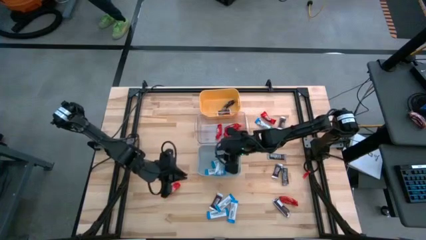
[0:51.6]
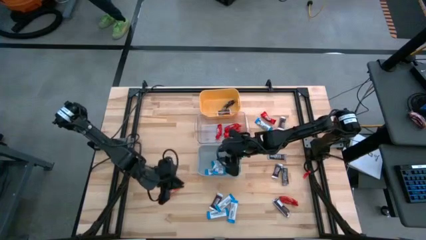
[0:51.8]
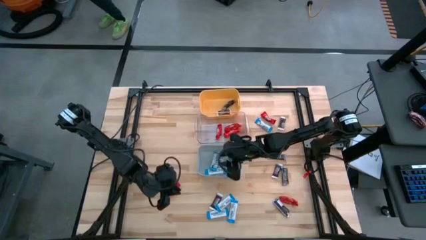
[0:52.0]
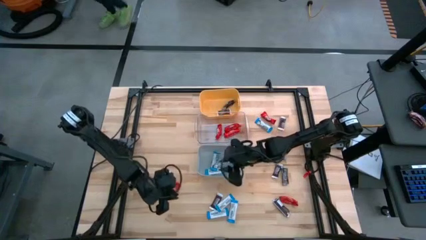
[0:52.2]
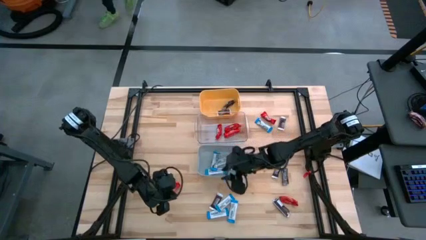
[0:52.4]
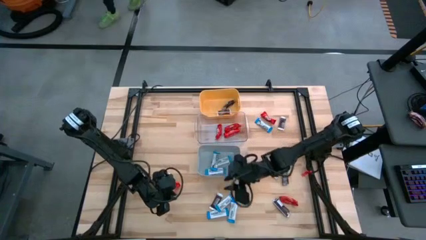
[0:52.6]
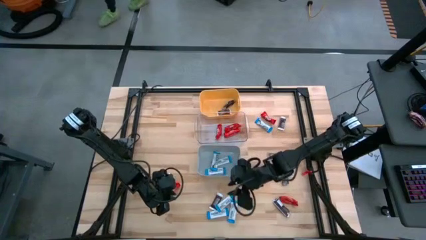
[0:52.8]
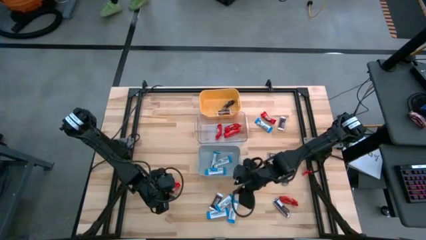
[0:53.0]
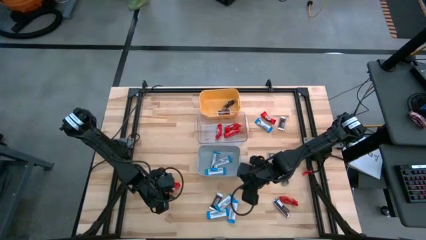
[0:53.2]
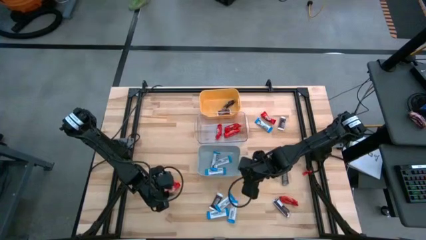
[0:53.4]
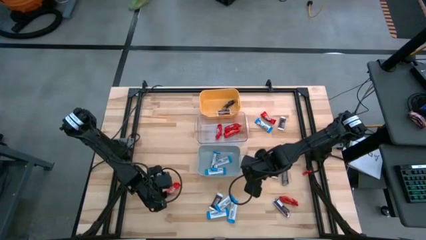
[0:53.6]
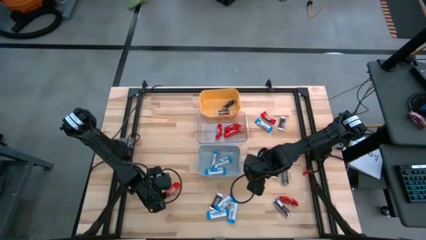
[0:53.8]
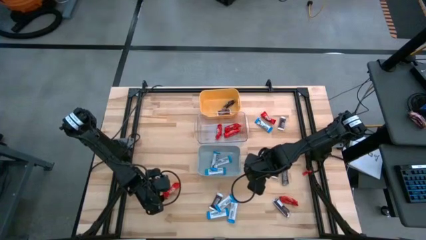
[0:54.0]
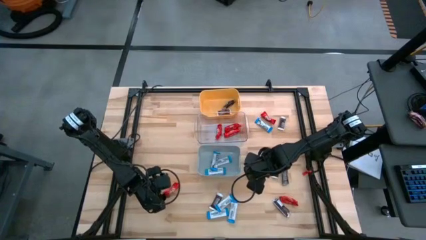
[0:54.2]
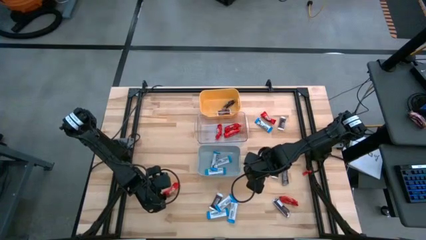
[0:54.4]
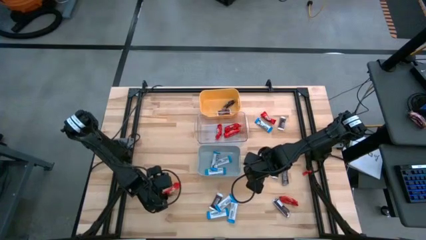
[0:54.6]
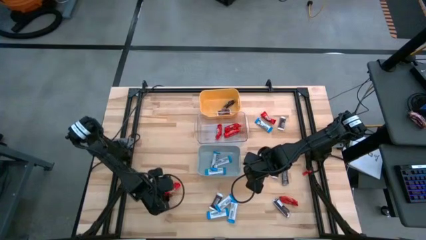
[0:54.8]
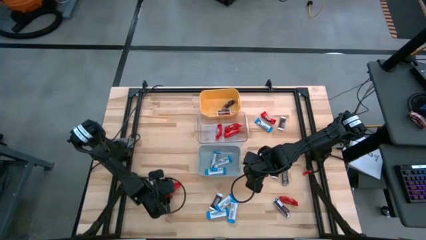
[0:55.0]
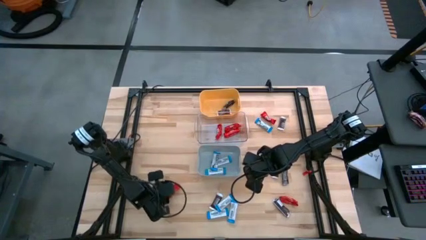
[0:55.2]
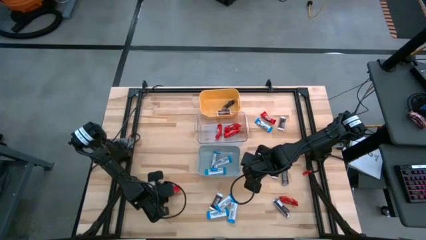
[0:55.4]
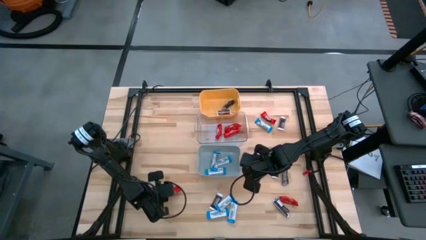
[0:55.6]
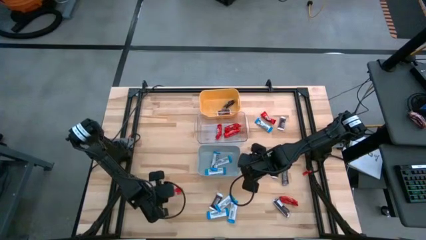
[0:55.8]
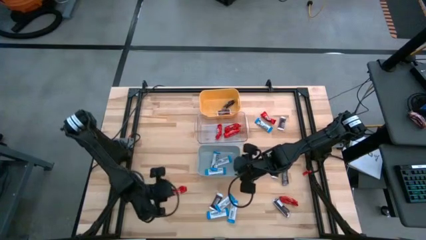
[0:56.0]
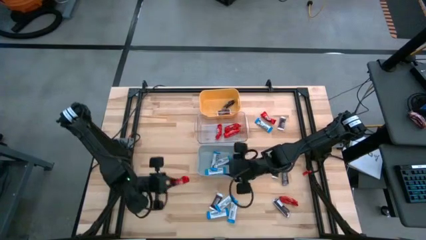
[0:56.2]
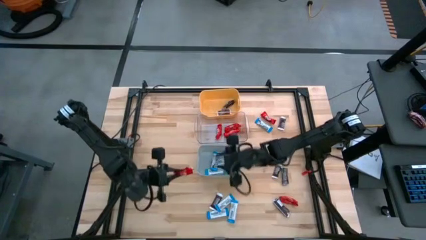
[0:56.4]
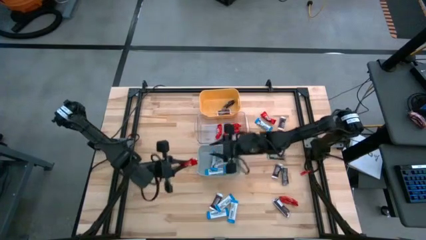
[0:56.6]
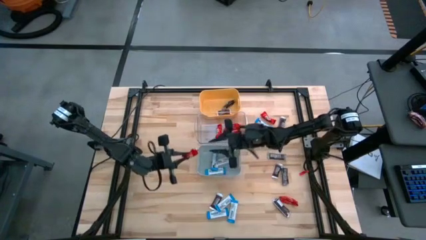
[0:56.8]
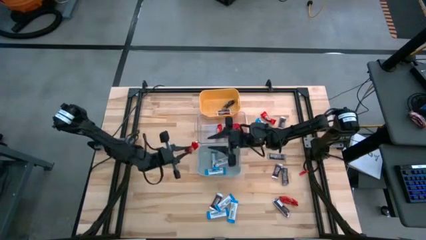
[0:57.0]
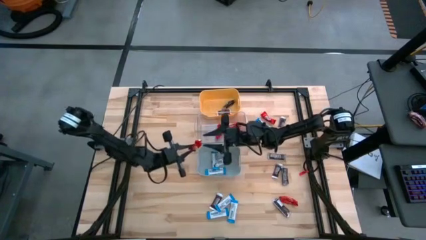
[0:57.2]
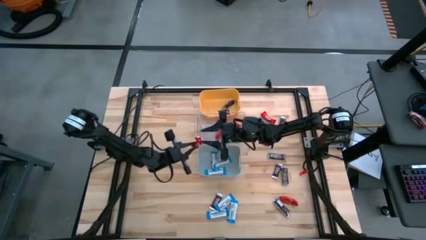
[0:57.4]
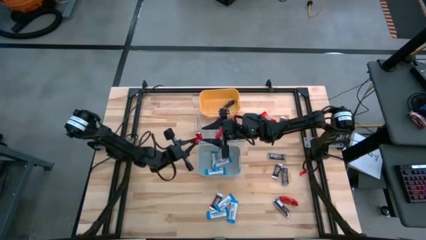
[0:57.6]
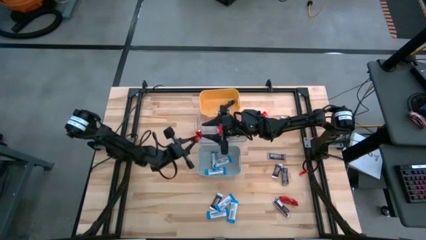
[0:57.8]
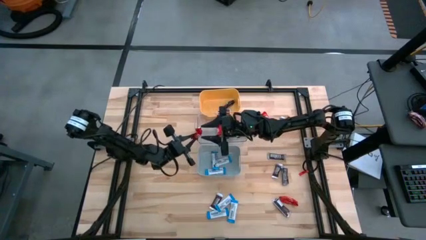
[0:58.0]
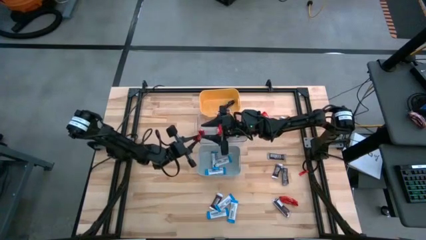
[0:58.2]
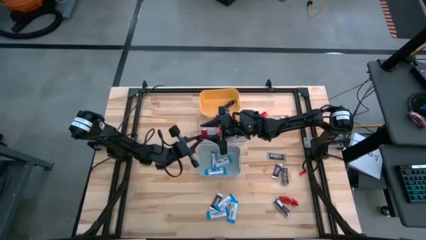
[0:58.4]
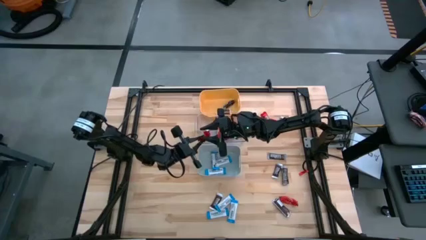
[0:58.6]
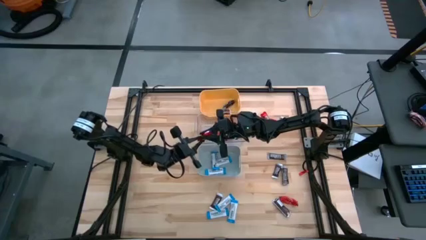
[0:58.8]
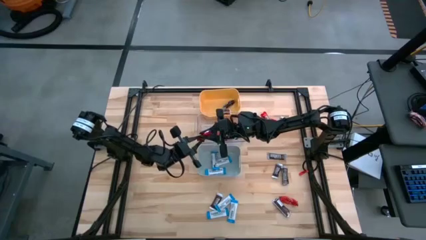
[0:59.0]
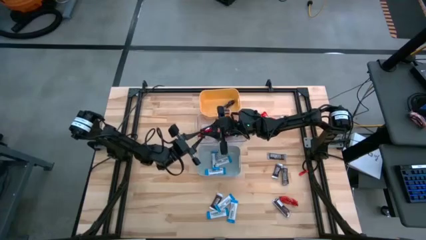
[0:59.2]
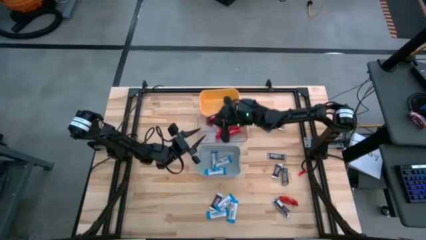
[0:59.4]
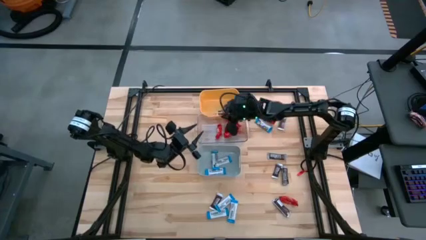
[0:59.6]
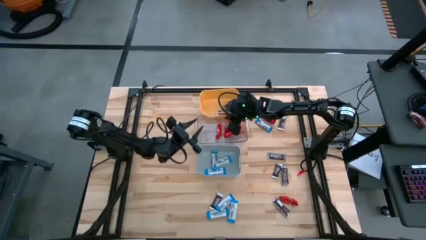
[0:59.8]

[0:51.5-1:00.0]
Task: Organize candy in baskets
Put the red chocolate bar into the transparent bin

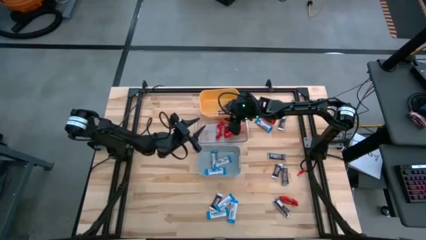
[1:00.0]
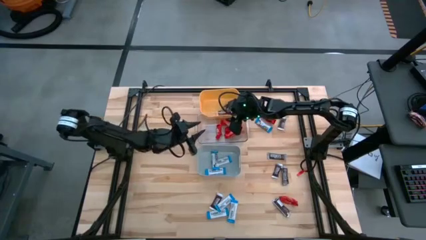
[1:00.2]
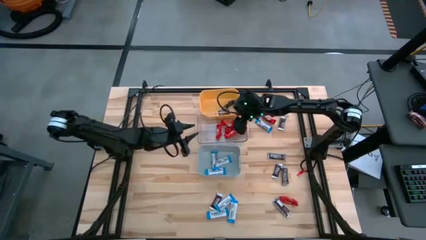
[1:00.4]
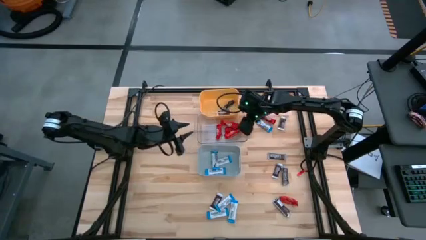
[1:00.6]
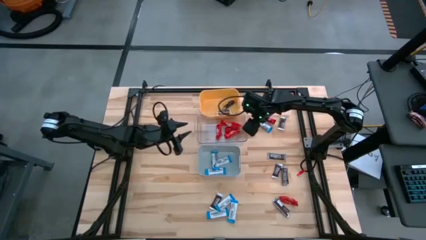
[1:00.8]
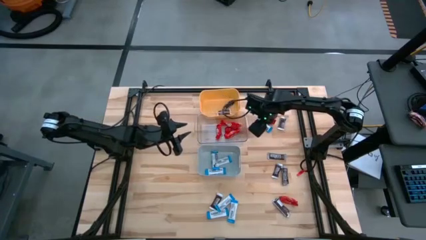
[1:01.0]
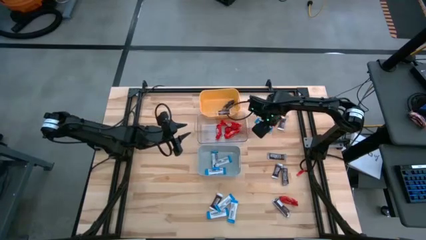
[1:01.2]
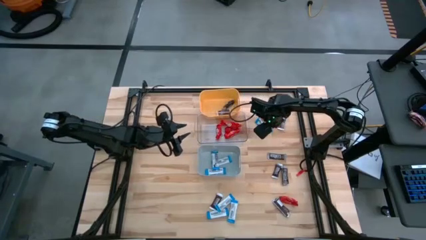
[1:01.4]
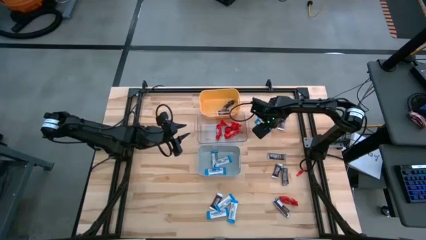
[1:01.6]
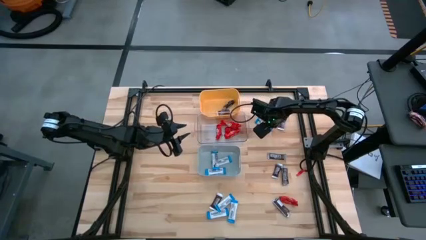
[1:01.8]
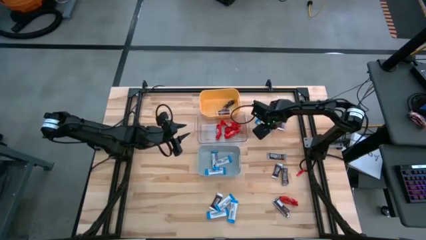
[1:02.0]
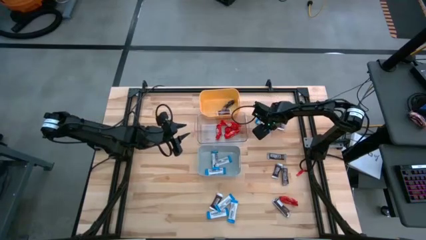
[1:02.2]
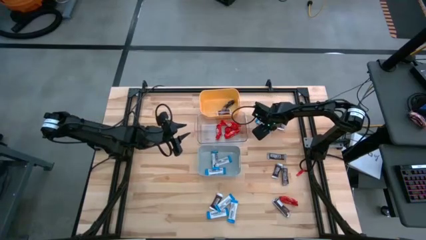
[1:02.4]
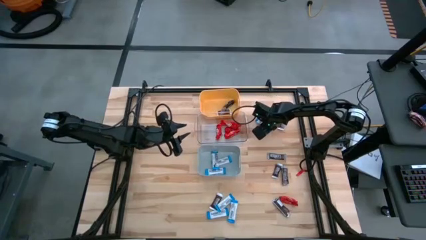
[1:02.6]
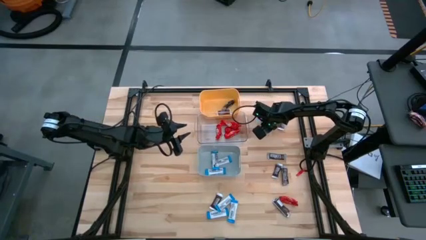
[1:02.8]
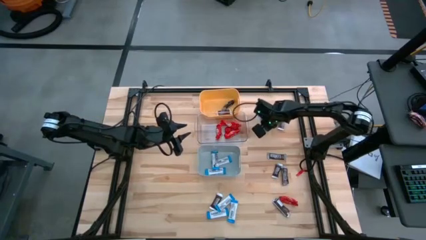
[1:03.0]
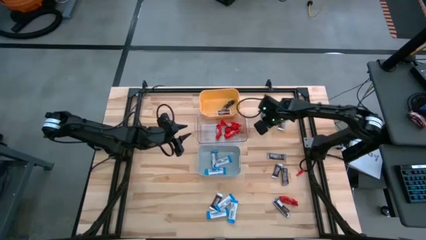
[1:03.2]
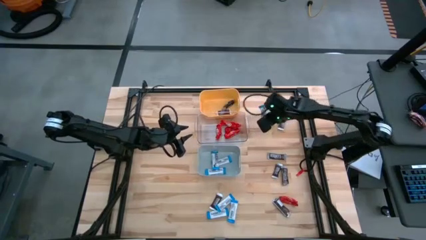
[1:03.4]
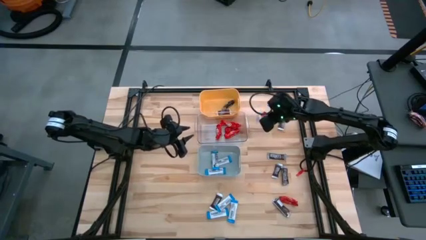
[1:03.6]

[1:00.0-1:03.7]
Put the white chocolate bar into the gray bin

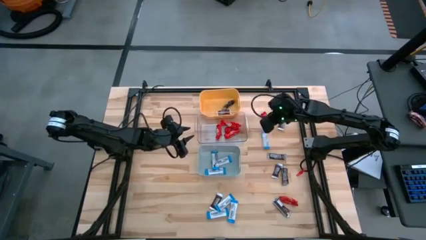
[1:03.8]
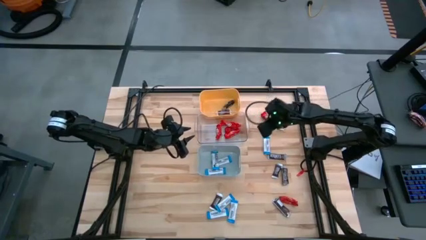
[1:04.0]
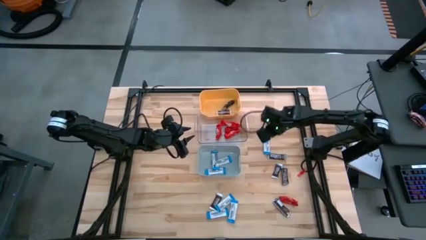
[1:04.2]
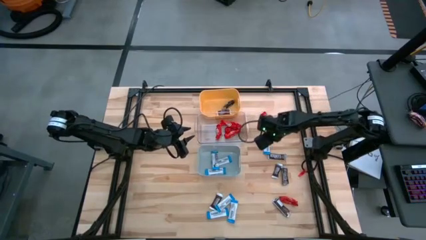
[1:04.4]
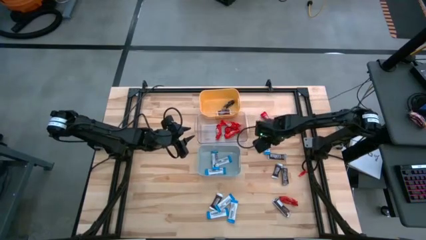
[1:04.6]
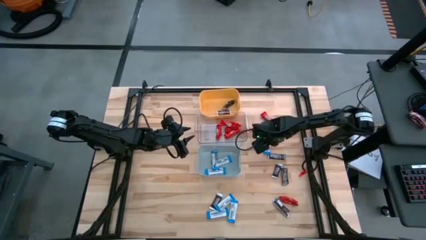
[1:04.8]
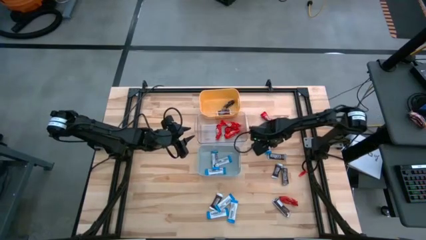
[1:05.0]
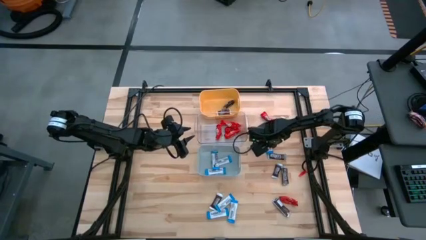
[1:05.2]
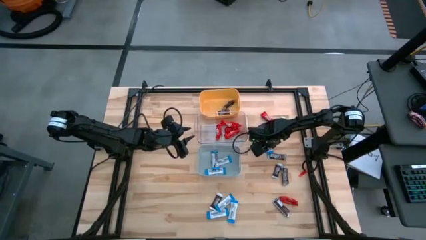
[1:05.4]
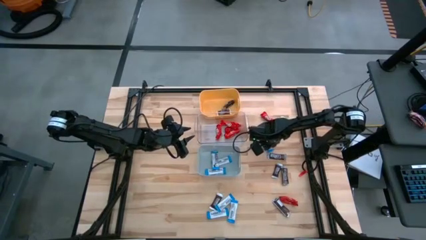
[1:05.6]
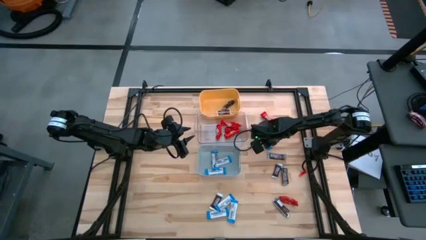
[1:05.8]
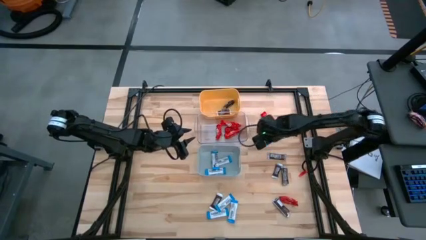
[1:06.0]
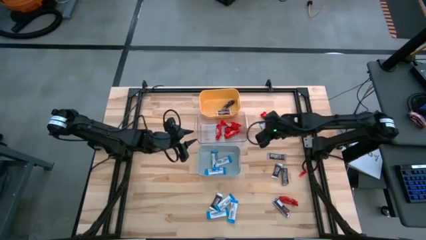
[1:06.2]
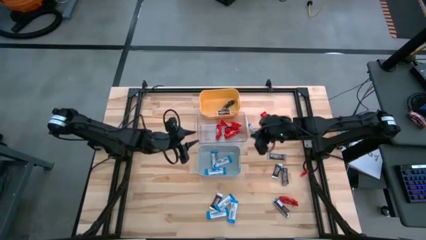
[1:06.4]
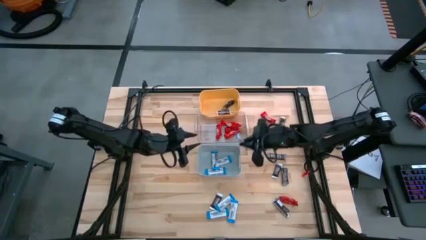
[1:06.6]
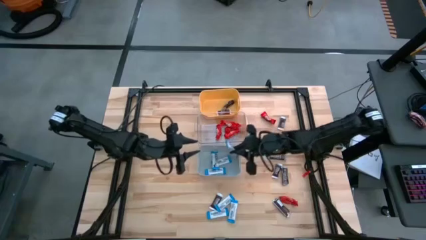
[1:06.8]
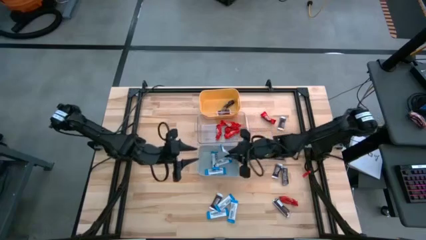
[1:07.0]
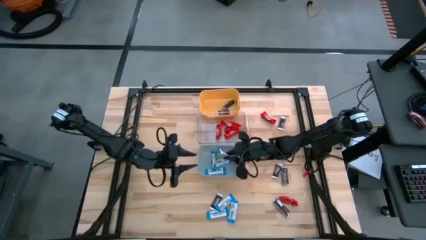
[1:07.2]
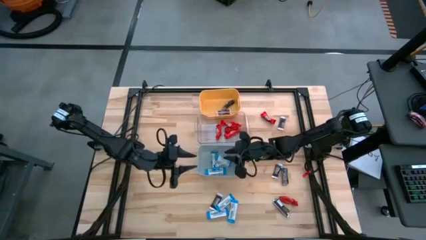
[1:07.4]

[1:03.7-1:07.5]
Put the white chocolate bar into the gray bin

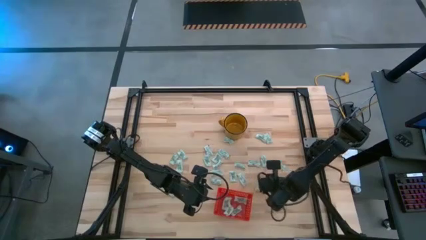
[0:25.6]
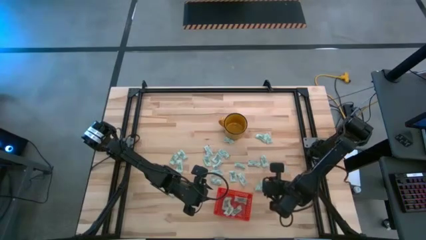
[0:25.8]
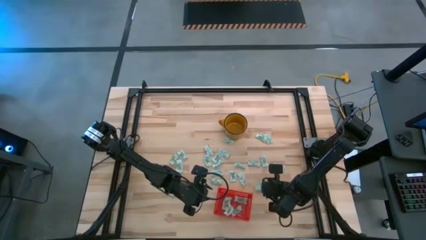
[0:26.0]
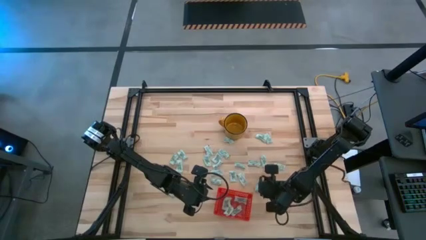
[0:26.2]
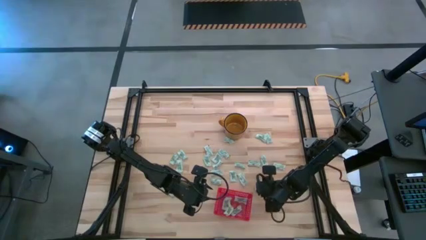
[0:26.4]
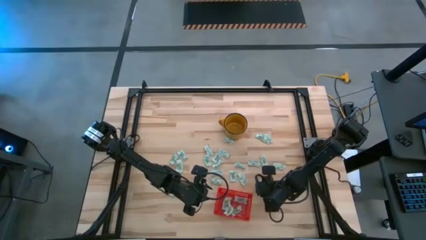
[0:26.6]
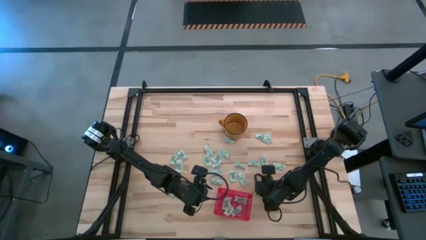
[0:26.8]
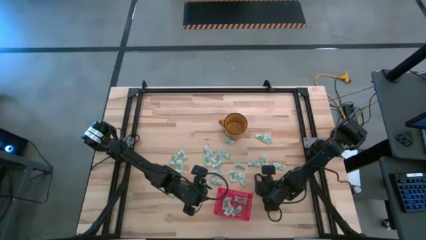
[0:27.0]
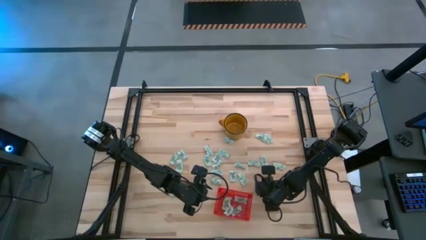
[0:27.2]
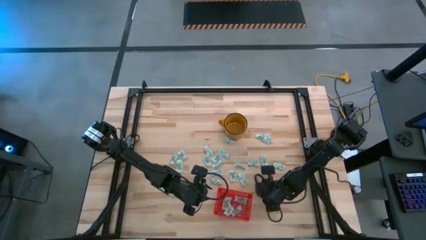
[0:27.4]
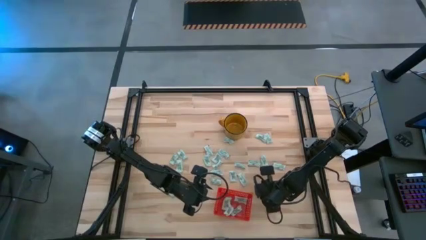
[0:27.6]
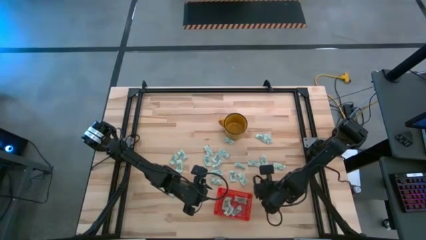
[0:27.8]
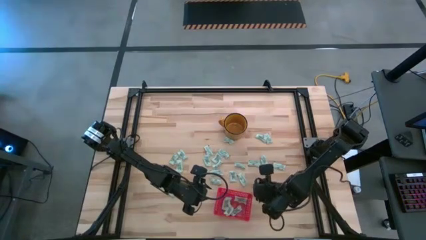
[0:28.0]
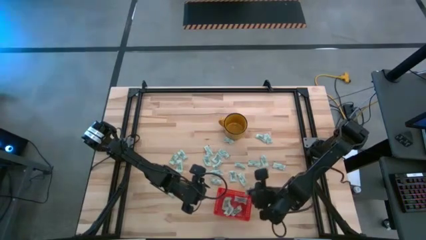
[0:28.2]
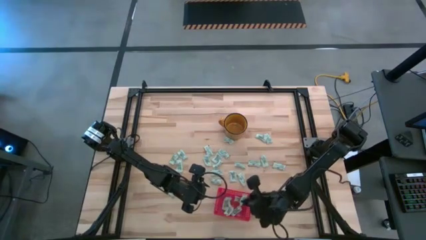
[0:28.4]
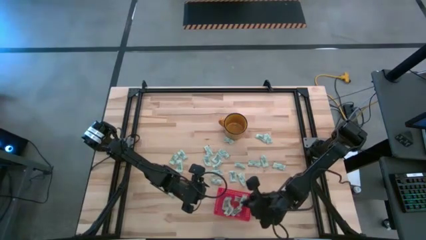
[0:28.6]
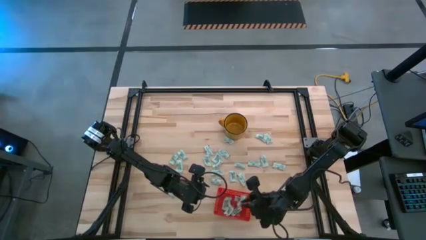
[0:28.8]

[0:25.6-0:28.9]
Task: Pick and place Stevia / Truvia into bins
Put the stevia packet into the bin
